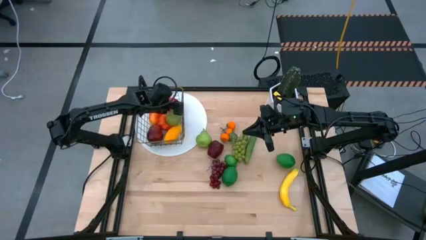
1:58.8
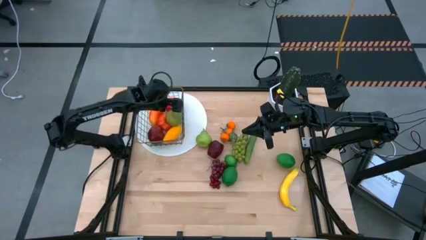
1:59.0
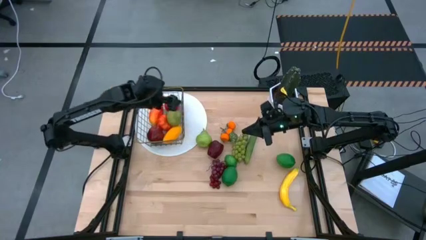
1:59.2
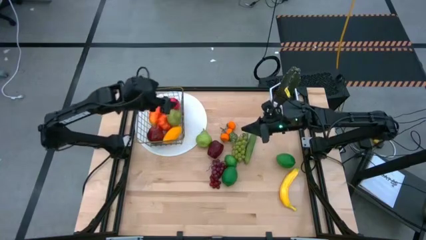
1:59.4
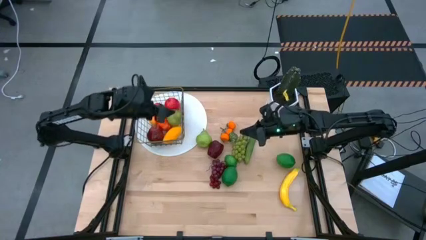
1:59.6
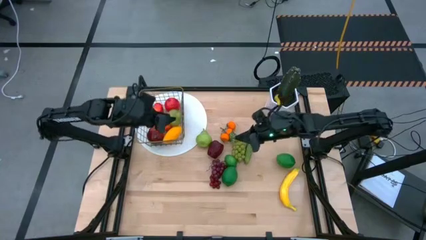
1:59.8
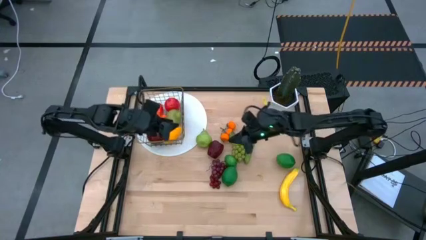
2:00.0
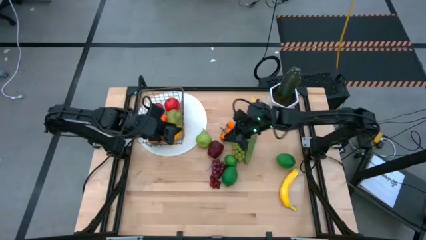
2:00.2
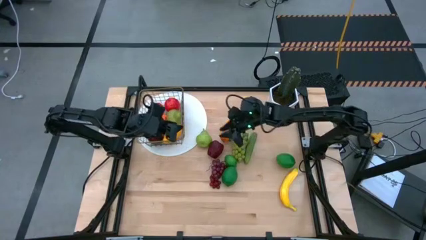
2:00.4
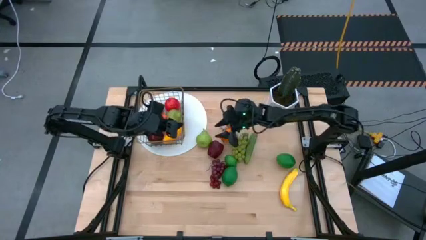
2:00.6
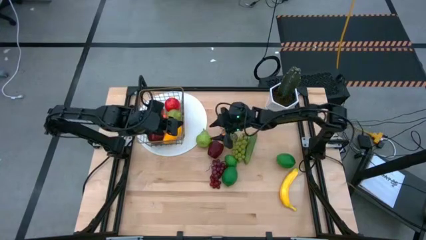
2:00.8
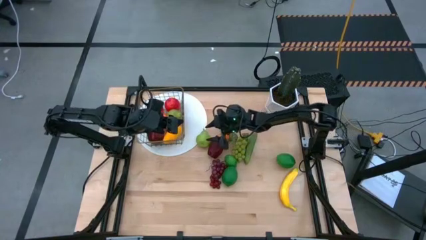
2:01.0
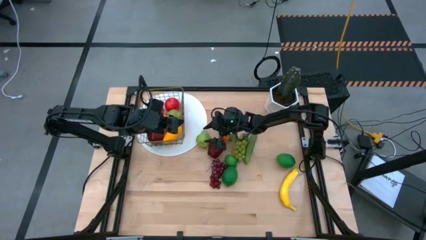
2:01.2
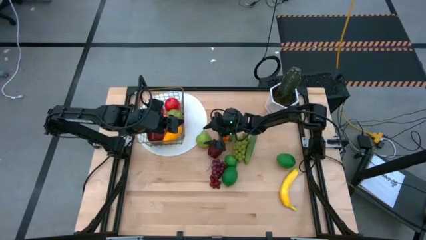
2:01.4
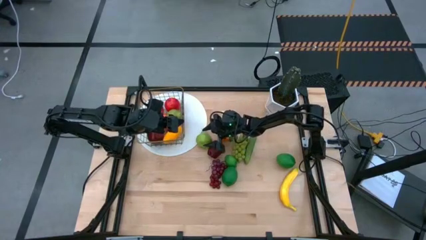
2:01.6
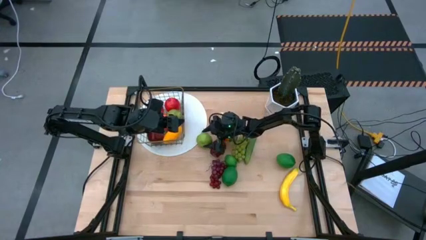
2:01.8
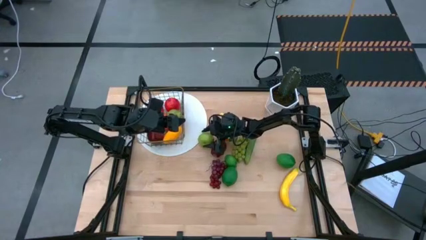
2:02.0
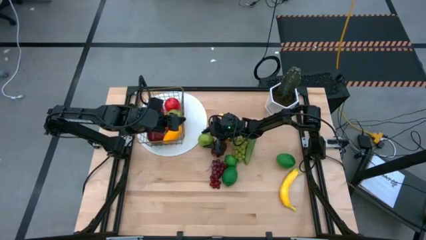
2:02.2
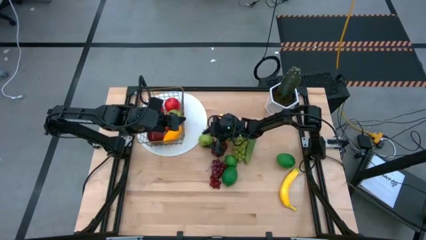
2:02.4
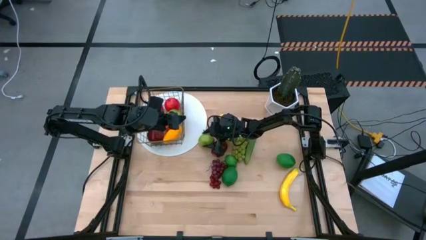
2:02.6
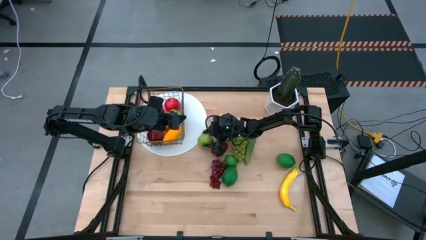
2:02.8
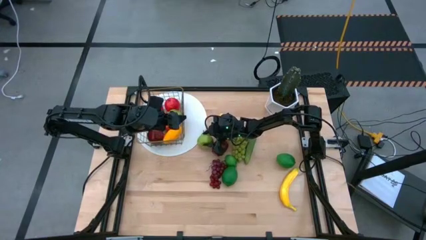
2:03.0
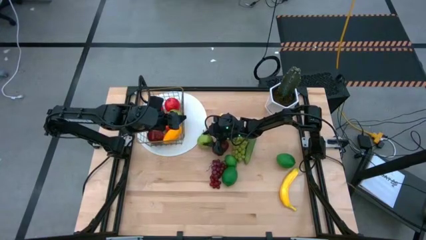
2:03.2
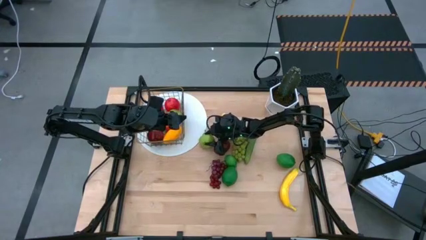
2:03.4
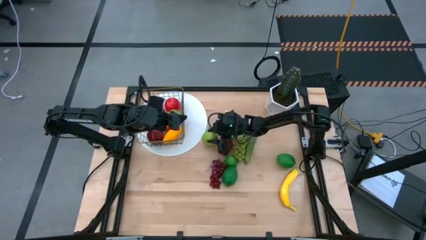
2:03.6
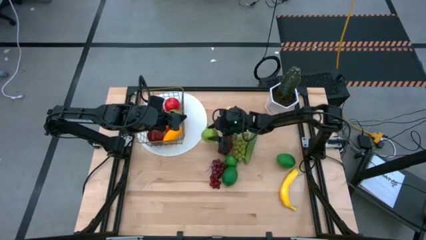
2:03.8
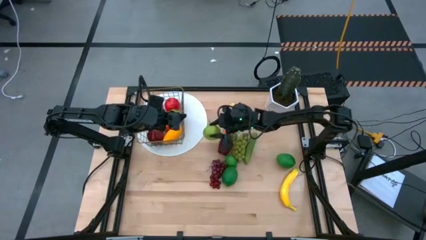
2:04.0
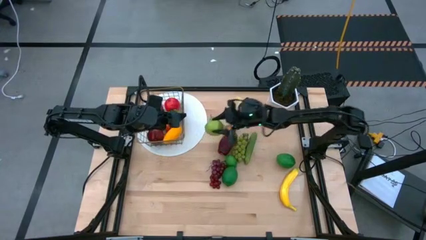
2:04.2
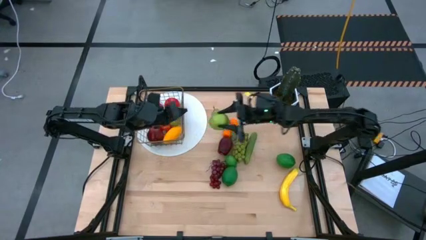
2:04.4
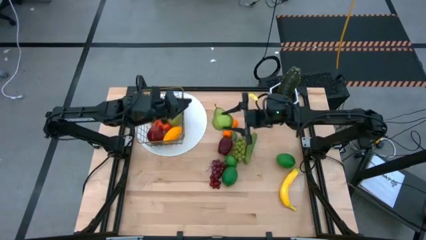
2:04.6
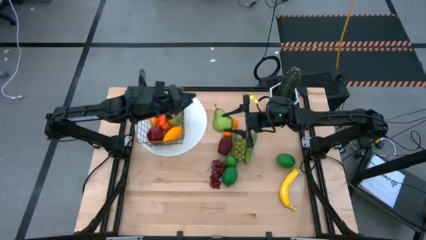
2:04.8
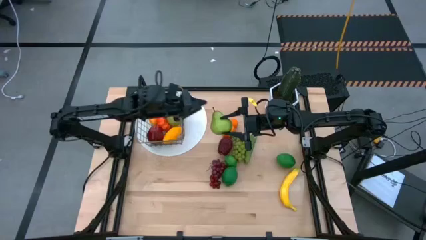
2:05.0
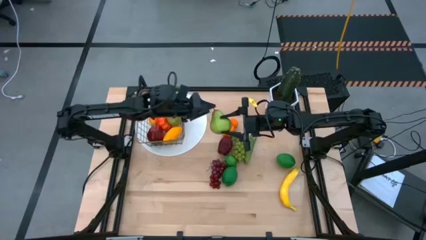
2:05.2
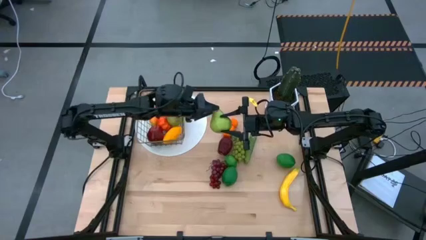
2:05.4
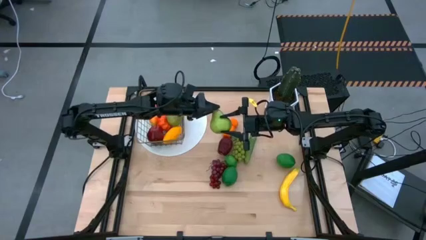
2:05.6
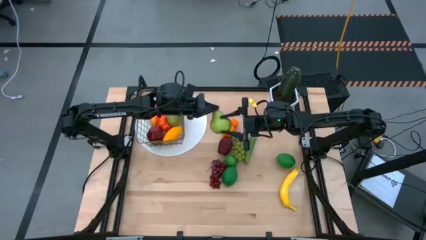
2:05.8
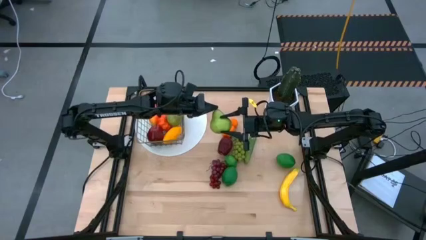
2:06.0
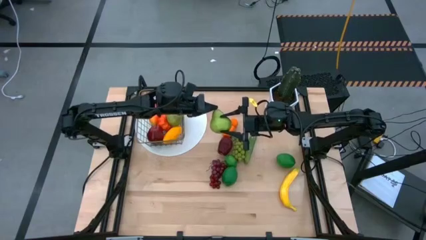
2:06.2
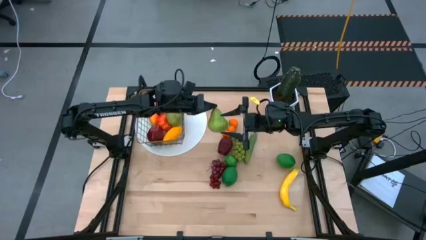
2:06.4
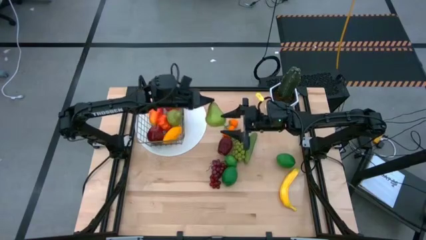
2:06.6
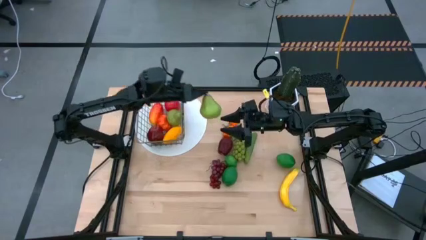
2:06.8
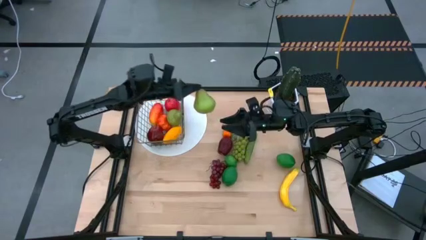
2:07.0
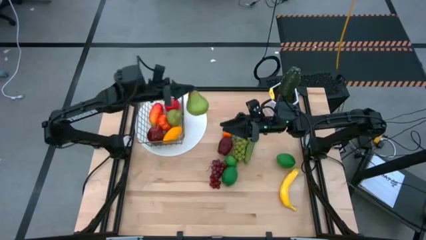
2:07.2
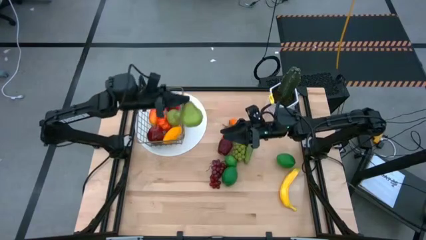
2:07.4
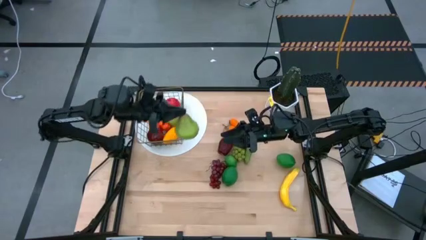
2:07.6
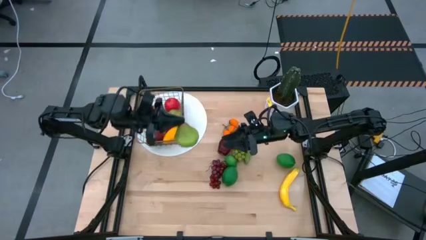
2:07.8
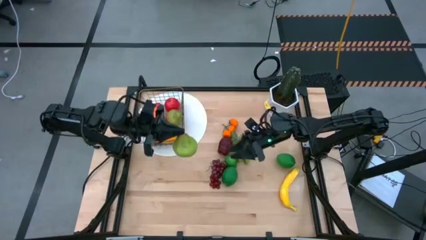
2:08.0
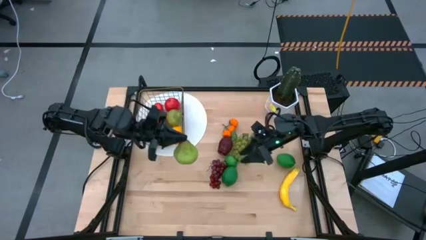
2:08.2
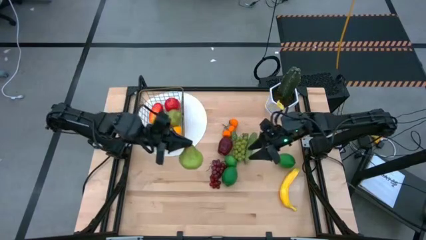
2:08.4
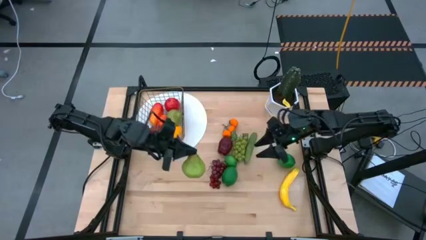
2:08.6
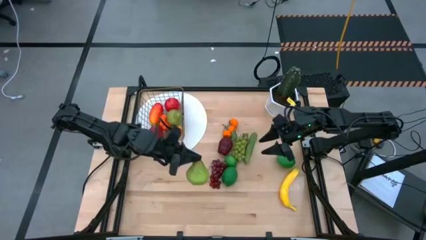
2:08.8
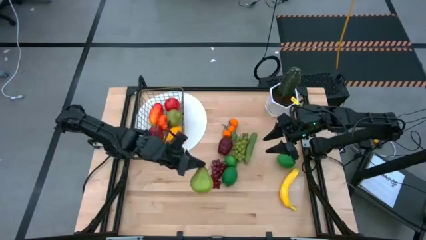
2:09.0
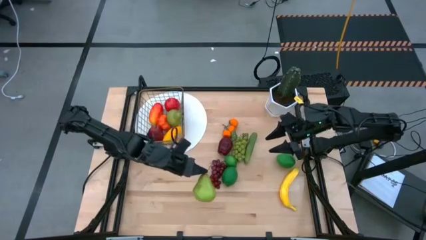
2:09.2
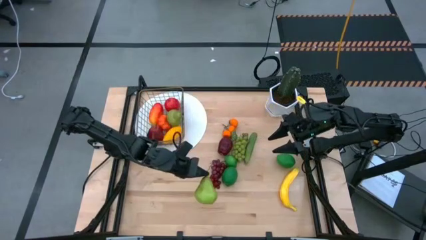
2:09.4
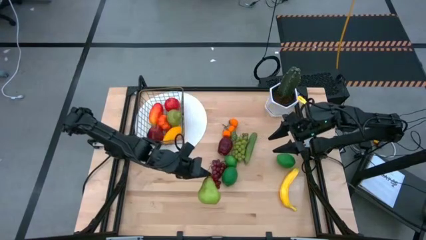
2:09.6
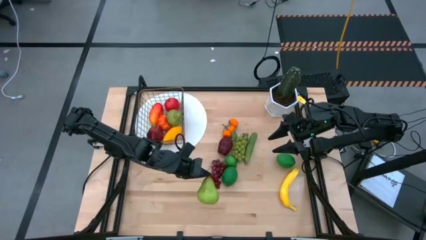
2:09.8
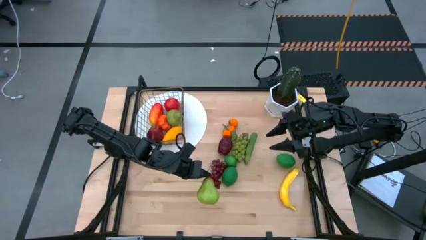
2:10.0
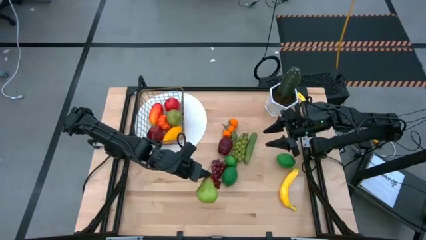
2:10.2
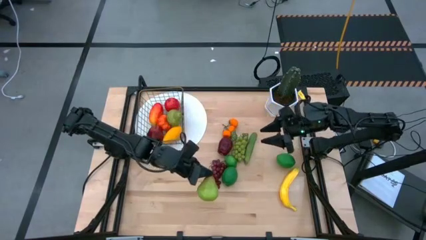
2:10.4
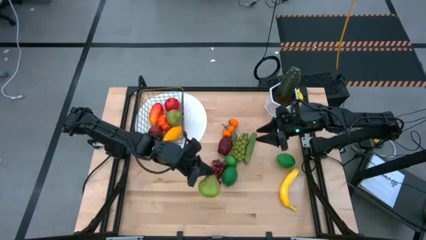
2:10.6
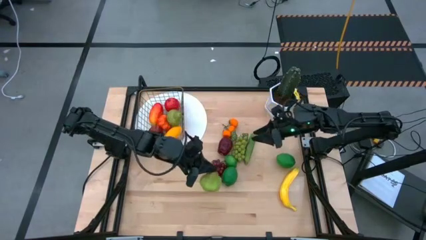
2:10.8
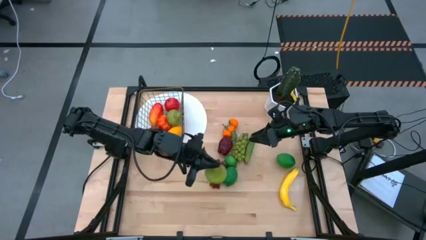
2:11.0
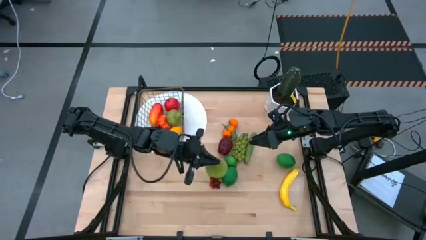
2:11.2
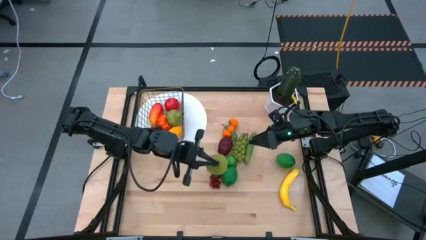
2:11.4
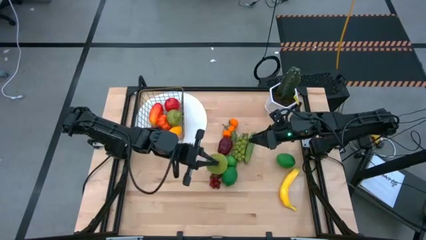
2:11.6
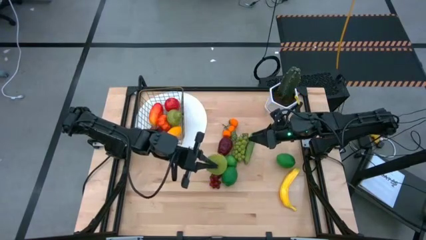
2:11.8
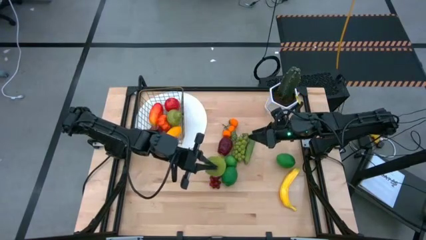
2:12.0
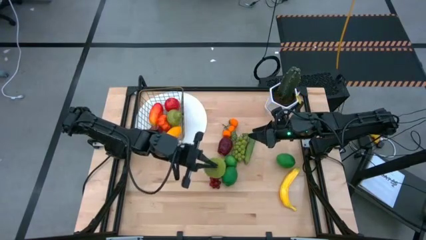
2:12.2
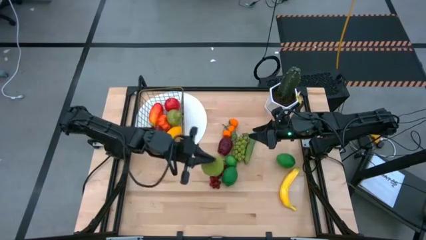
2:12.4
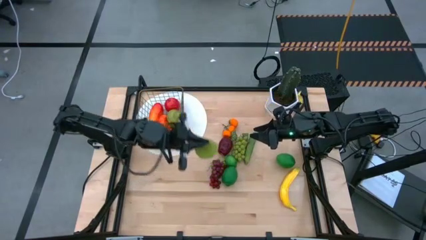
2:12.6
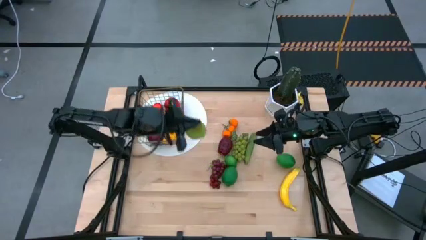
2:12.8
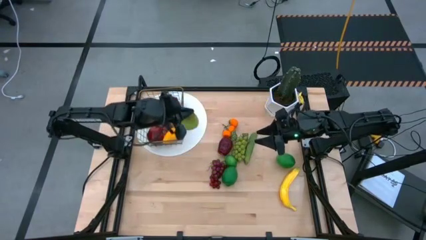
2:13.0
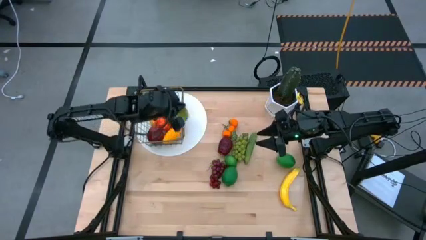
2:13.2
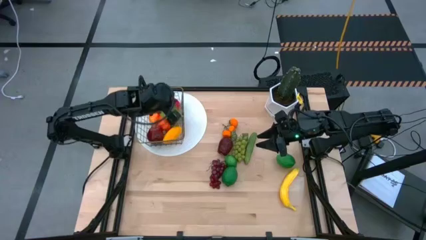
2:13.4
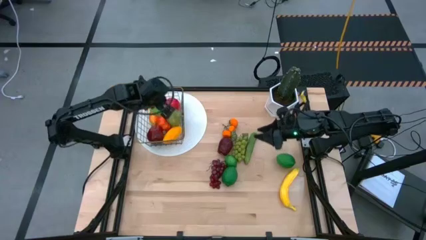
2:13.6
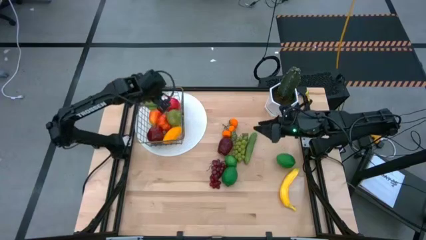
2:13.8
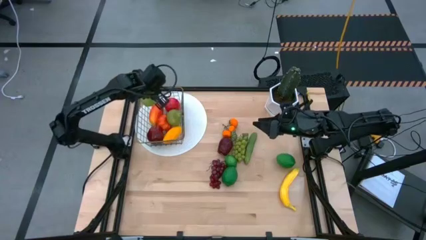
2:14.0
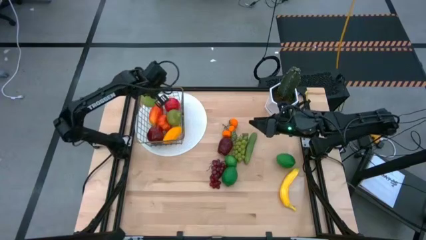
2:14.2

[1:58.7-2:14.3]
Task: Build produce basket
Put the green pear into the wire basket

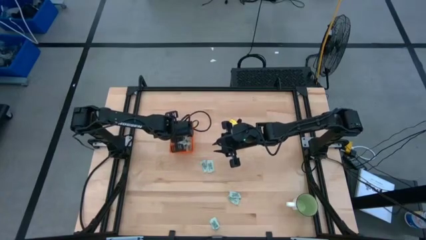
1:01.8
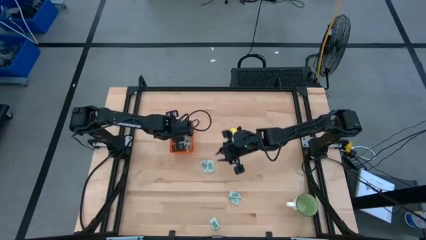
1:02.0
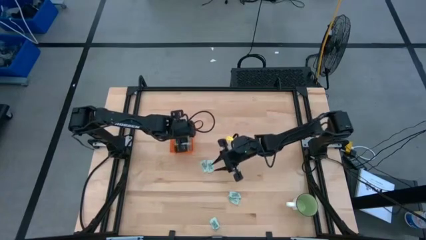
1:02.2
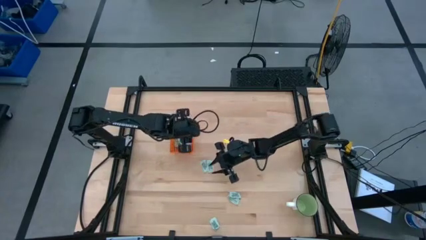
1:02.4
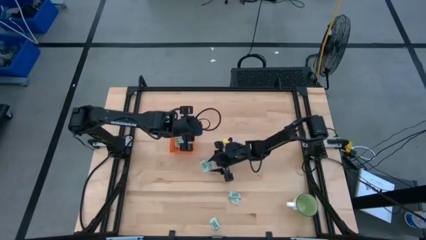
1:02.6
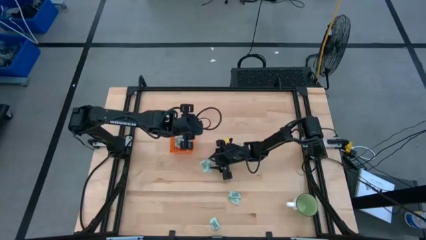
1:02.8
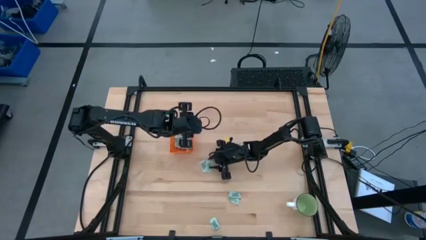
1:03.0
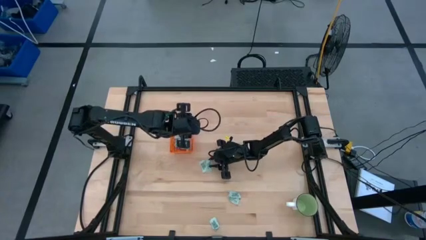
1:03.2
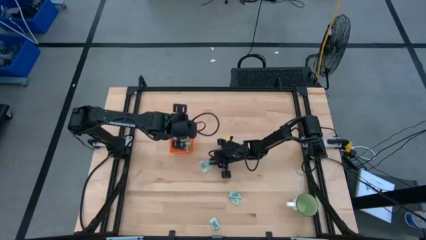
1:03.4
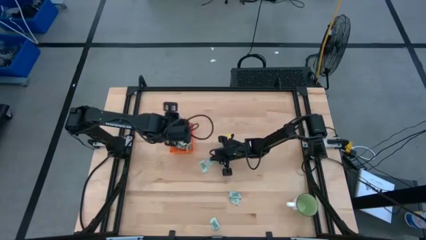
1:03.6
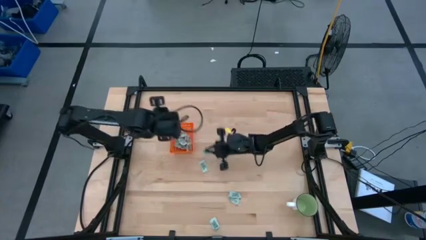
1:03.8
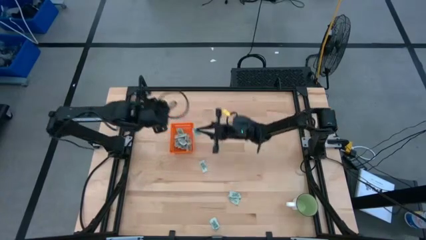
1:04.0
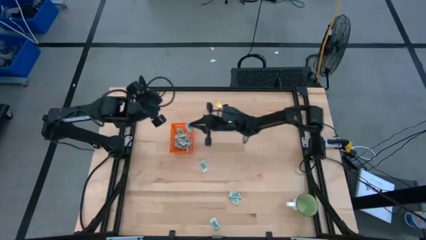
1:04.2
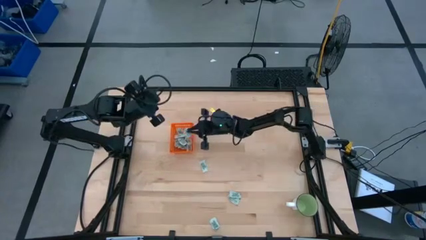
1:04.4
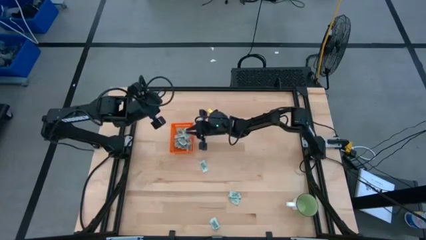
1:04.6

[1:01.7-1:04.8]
Task: Pick and place Stevia / Truvia into bins
Put the green stevia packet into the orange bin
